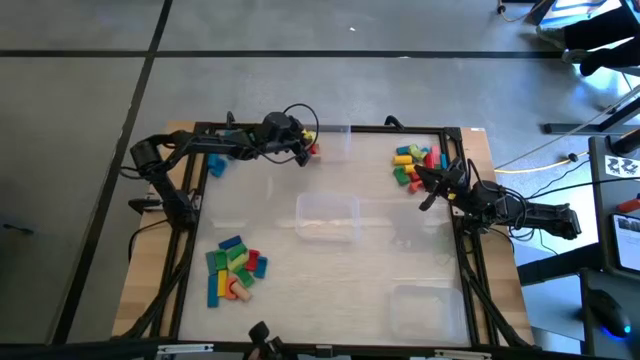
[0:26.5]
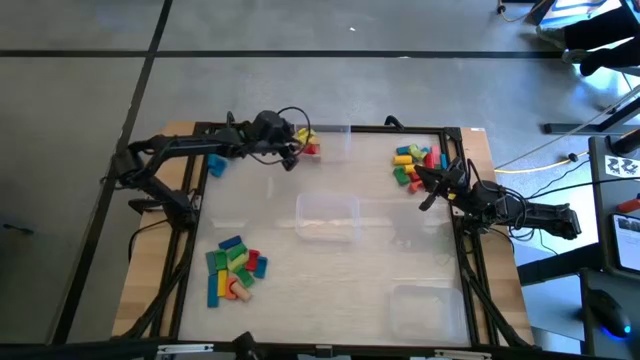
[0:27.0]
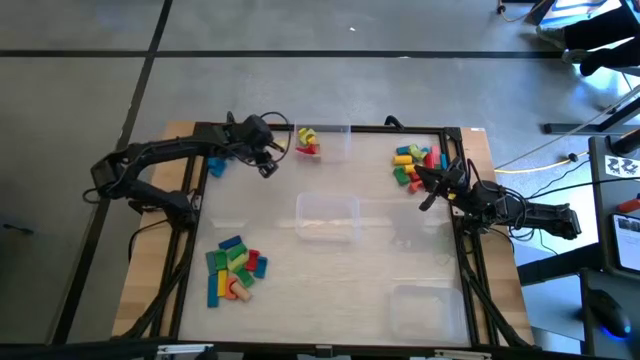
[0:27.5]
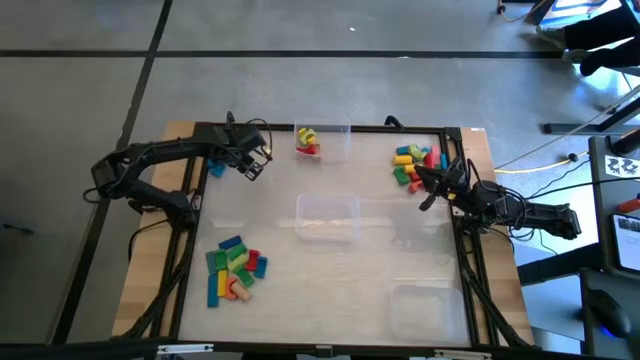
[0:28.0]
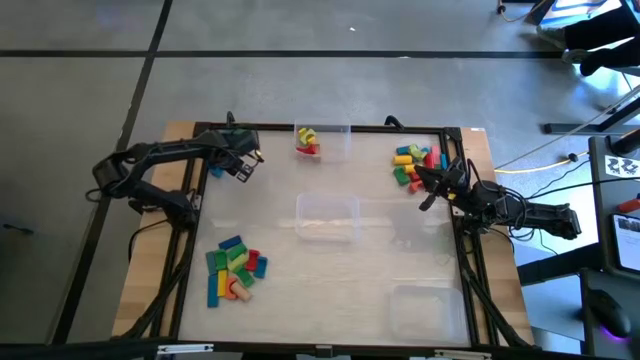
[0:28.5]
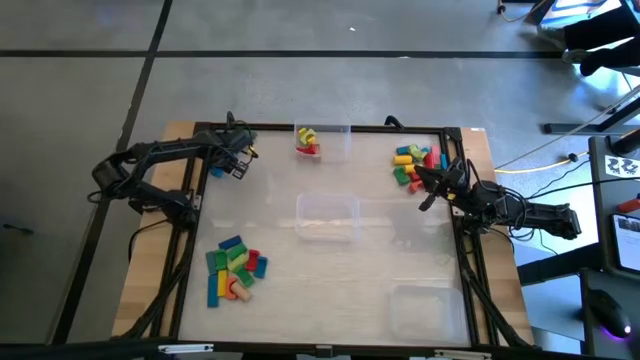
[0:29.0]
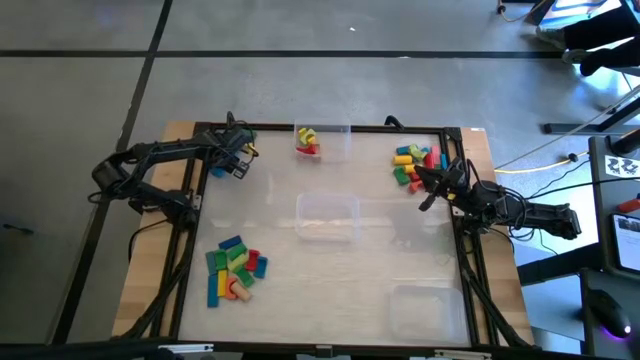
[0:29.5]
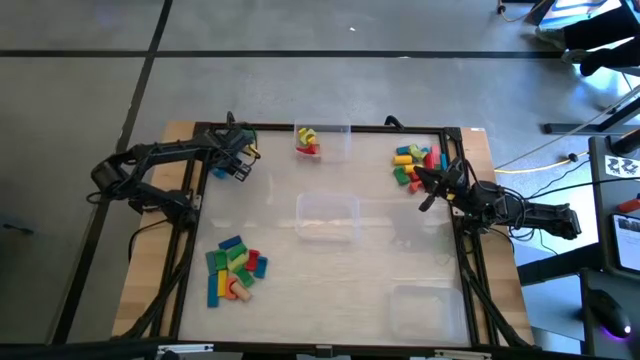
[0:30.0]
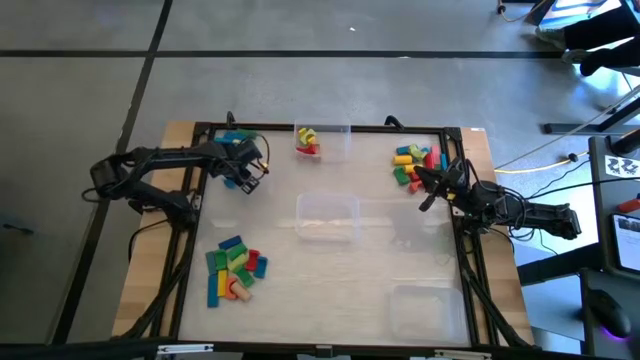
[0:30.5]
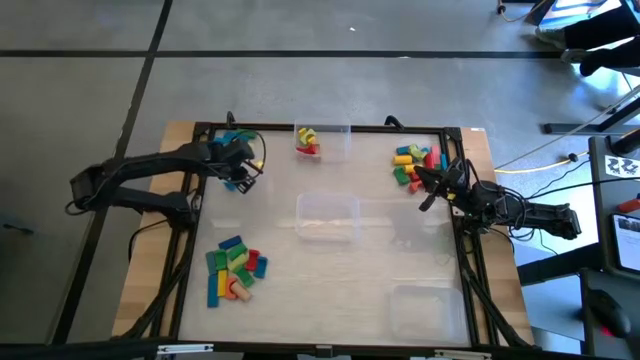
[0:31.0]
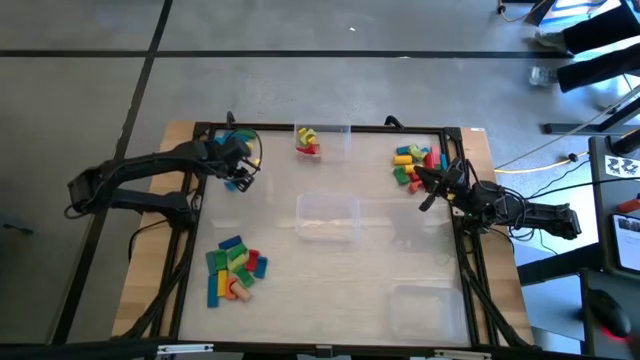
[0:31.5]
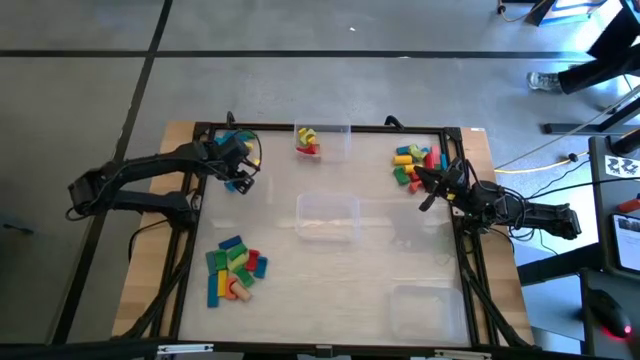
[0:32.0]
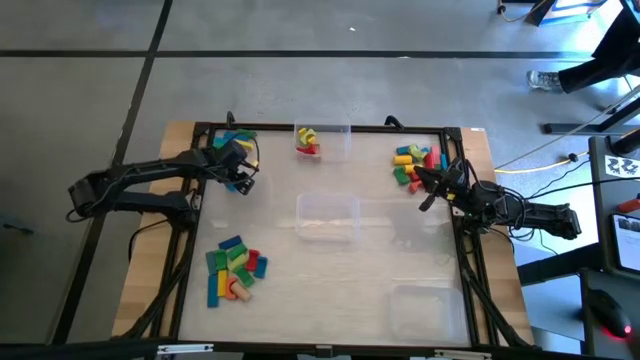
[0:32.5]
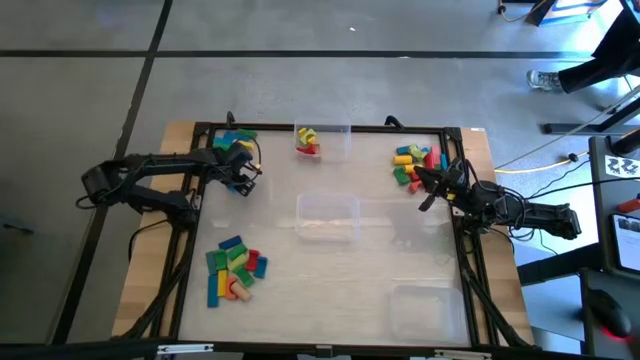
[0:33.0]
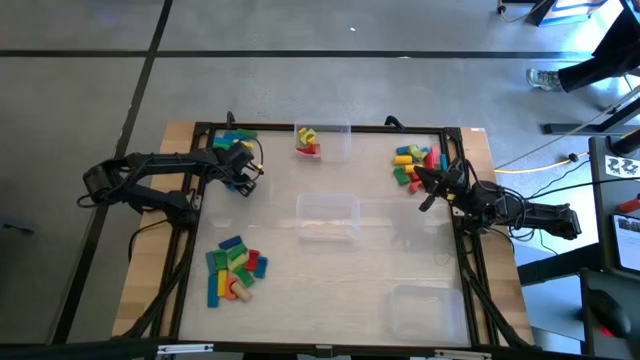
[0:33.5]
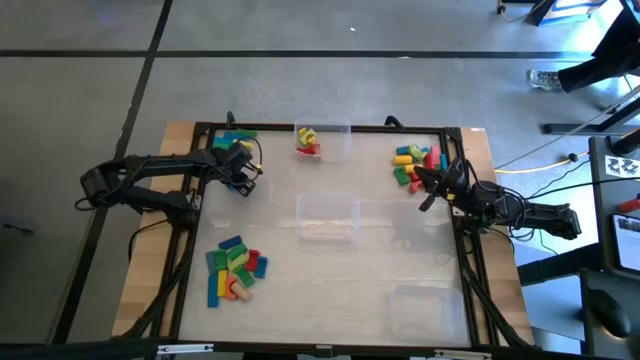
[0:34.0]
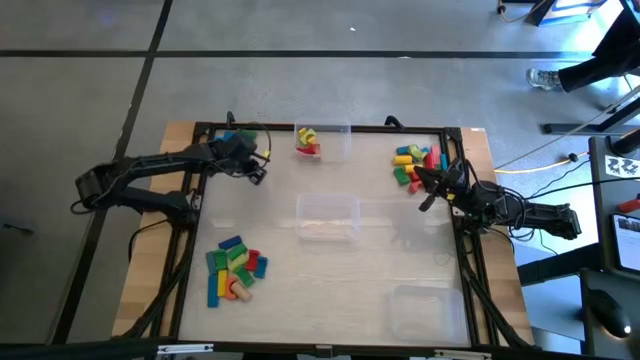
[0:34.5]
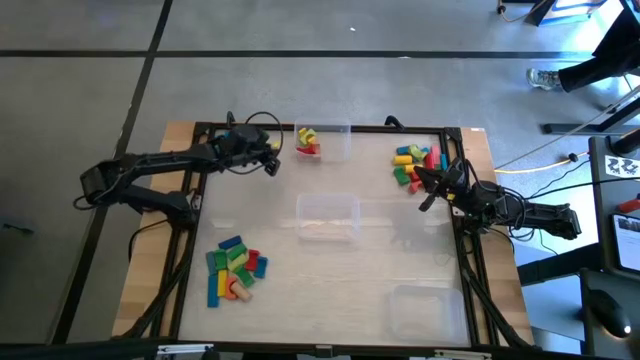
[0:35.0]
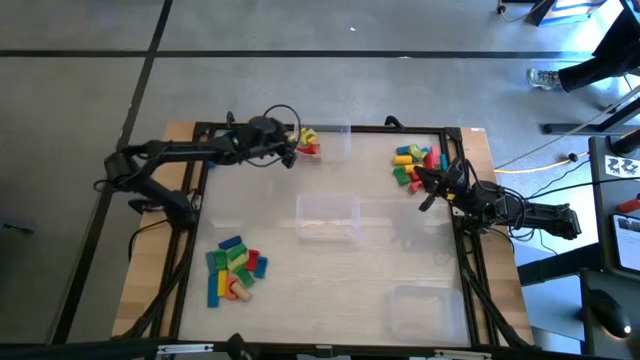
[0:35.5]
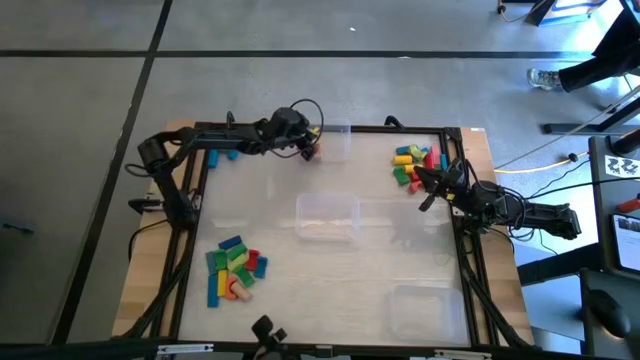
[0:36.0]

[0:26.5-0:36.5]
Task: Sort blocks by size
Put the blue arch block into the top transparent bin

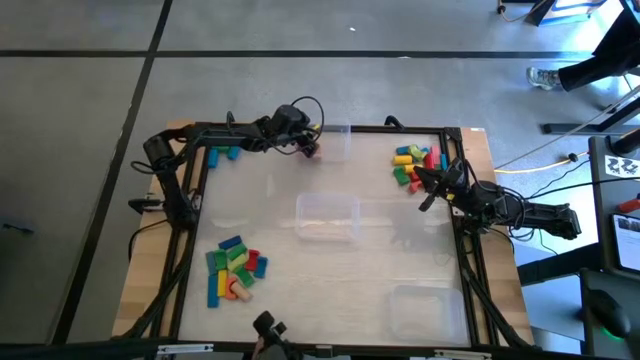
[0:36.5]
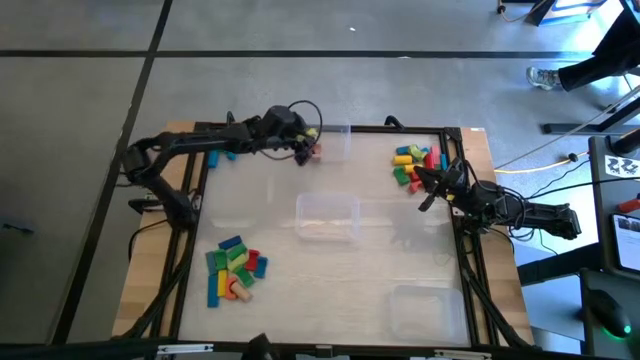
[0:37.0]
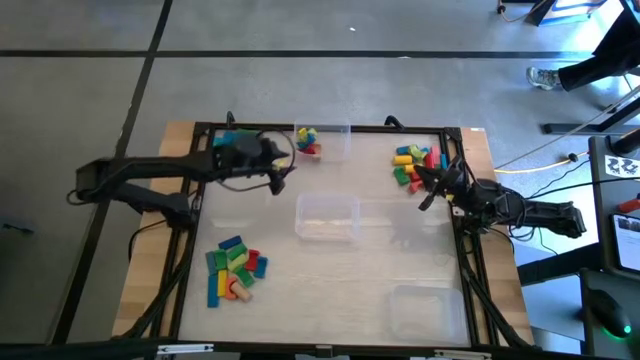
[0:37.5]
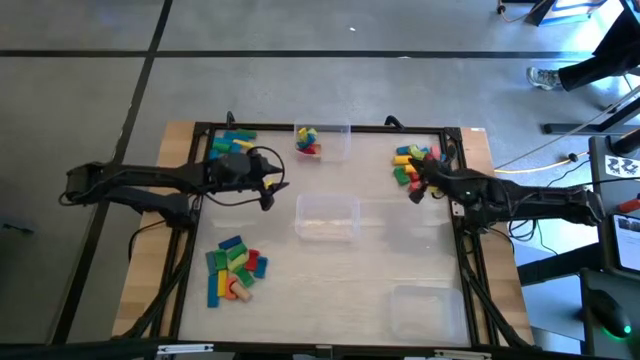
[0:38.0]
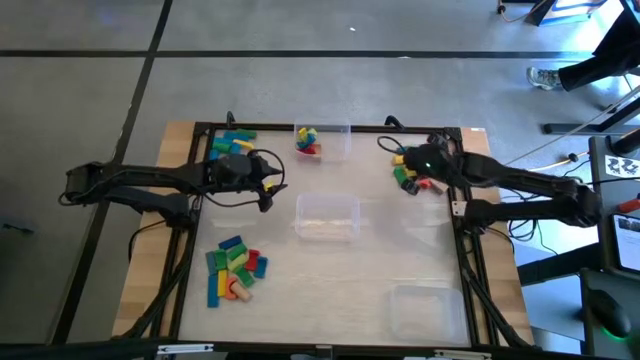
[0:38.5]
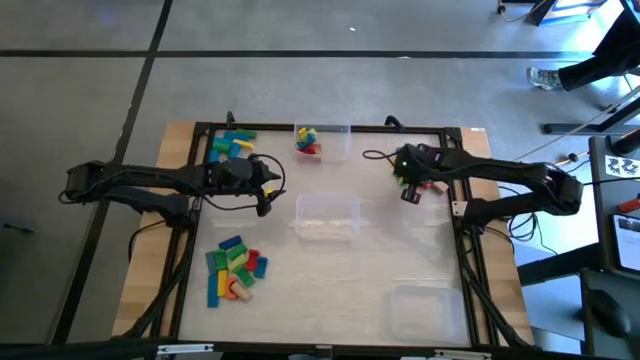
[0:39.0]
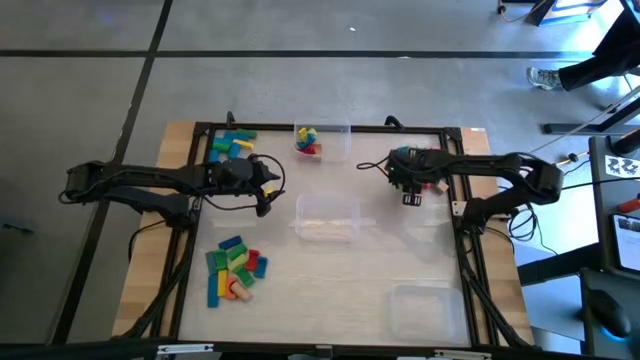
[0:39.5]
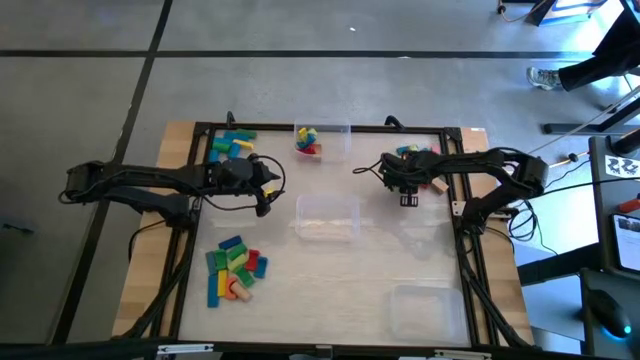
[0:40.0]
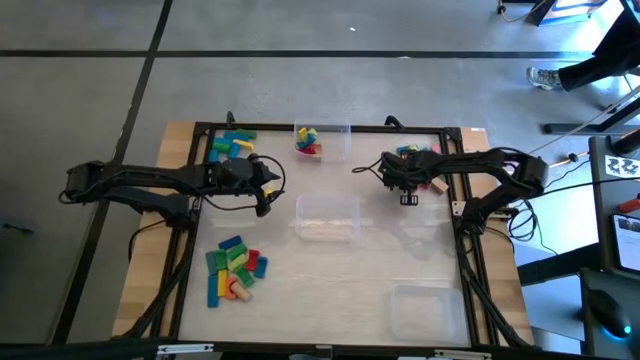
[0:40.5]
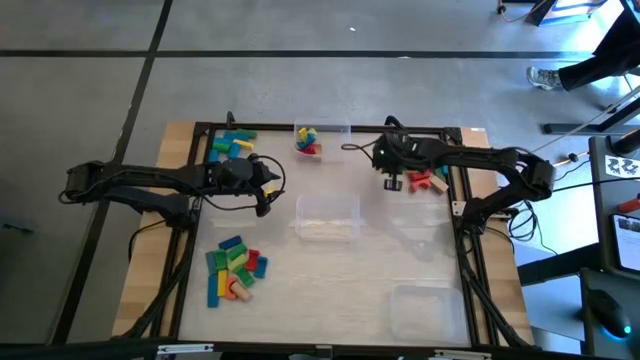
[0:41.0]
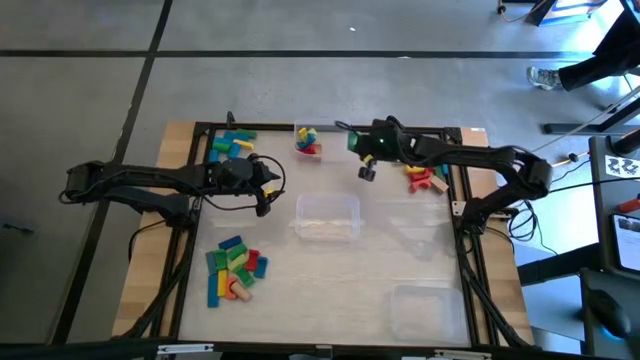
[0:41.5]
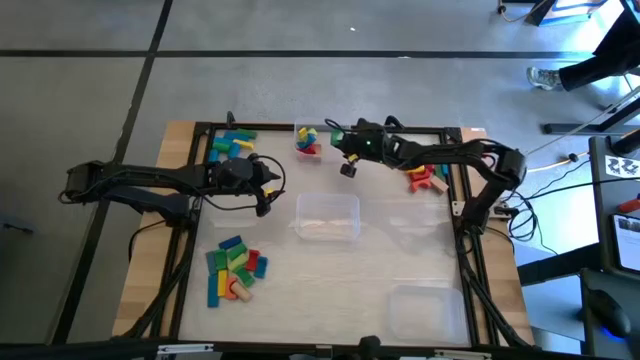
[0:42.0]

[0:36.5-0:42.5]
Put the green arch block into the top transparent bin

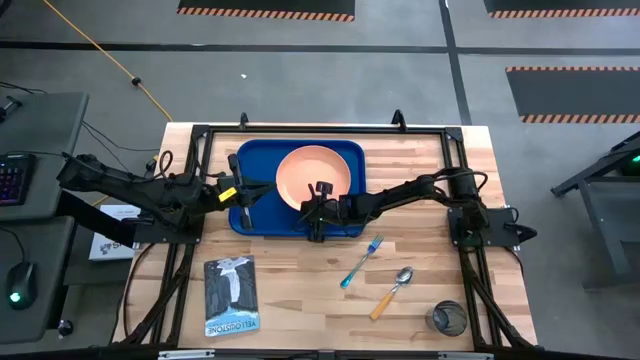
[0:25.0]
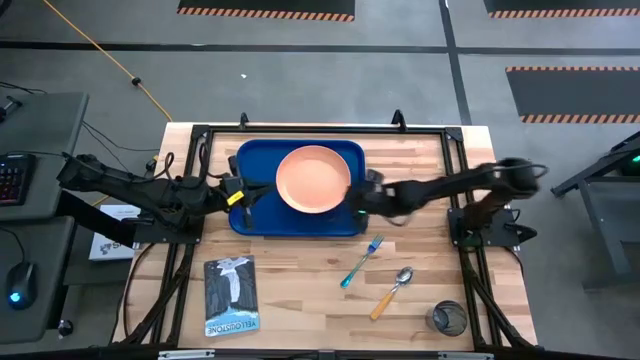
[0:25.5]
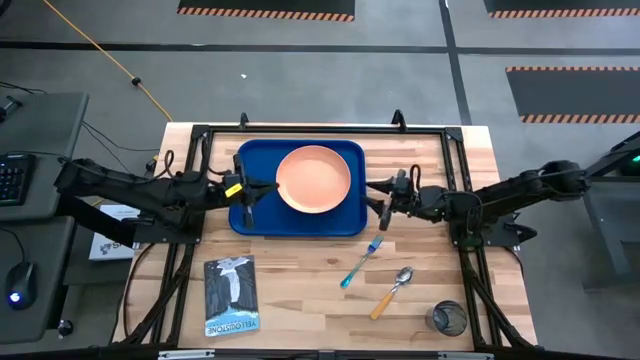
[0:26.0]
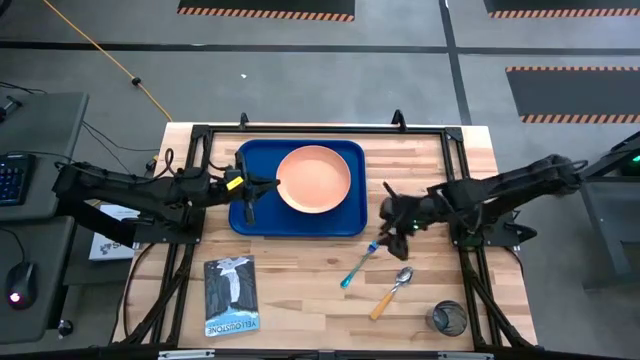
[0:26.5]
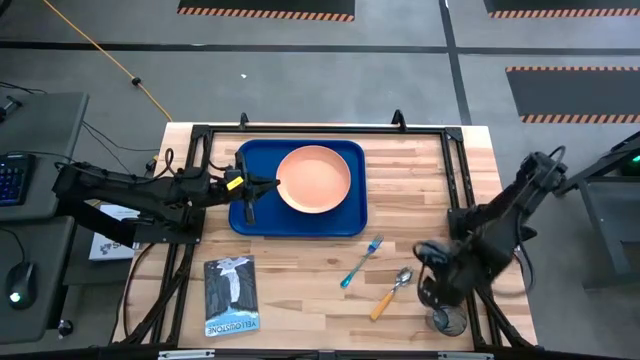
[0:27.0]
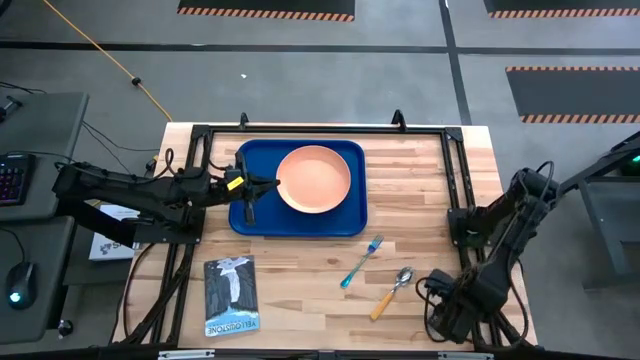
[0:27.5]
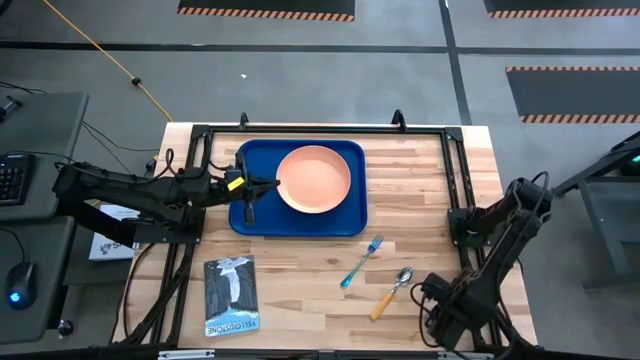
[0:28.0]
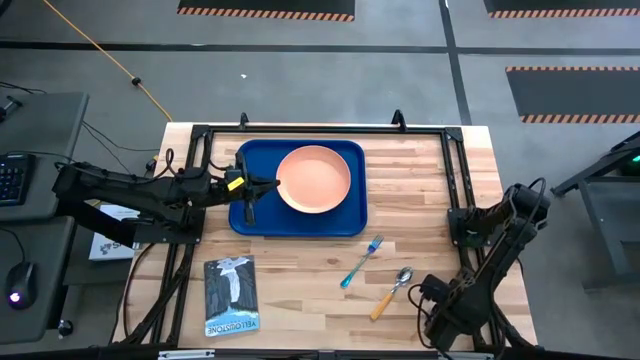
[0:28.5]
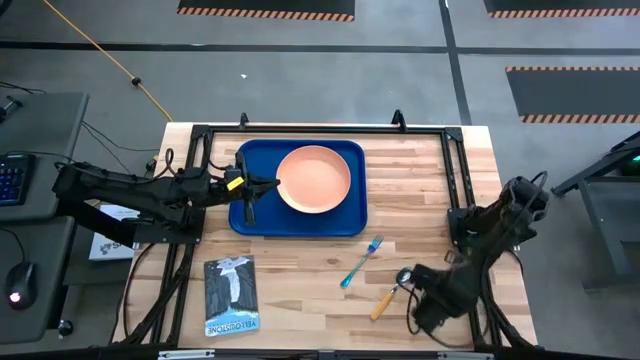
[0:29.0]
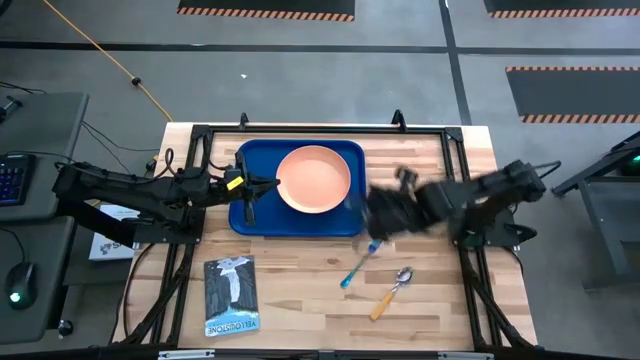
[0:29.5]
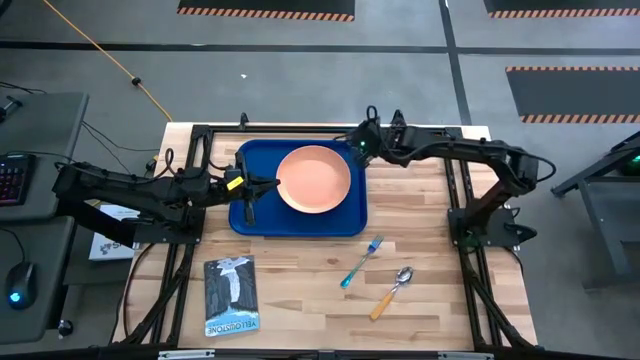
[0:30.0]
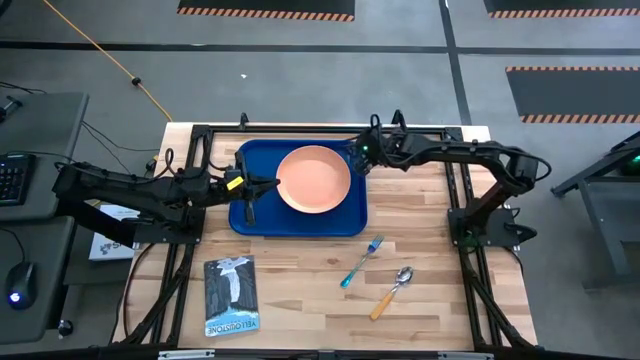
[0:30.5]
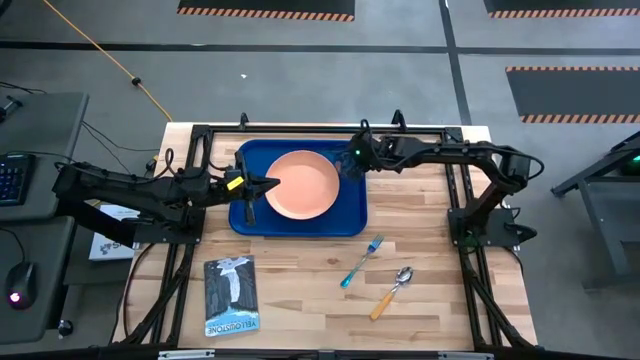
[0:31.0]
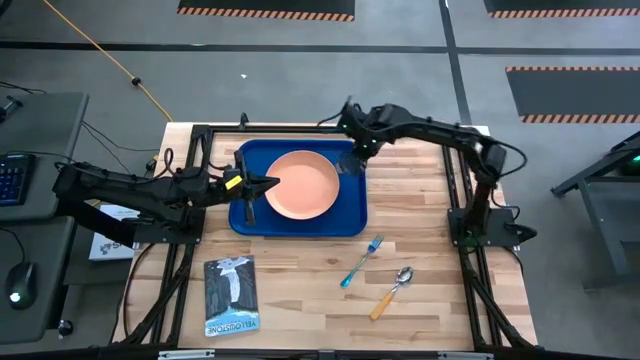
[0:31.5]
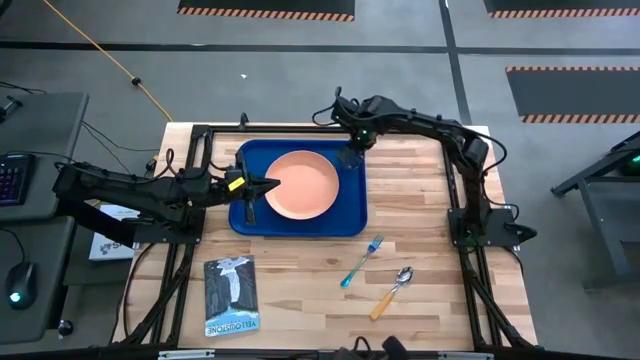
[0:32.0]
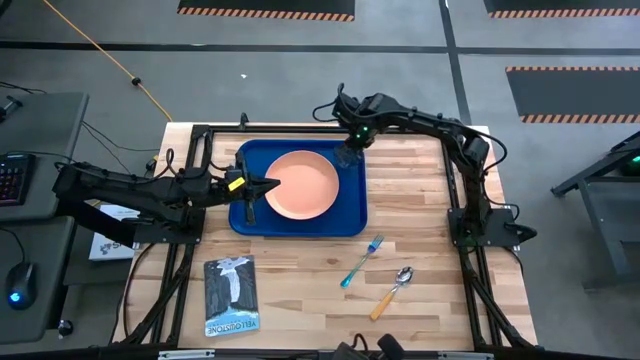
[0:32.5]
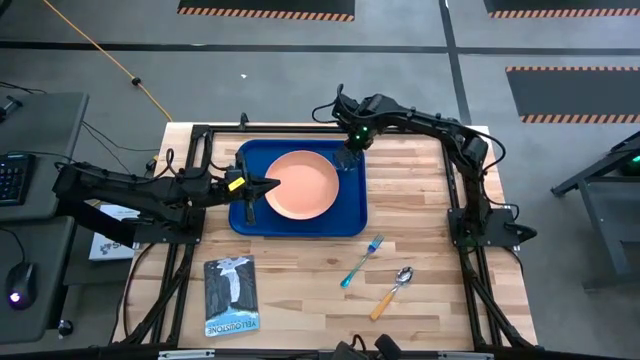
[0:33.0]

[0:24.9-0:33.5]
Task: Pick and place plate/cup/fork/spoon on tray
Put the blue cup on the blue tray
